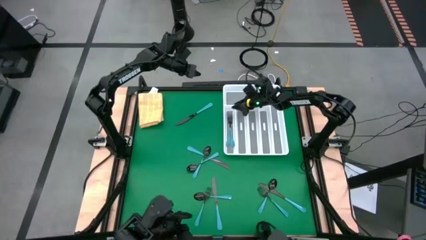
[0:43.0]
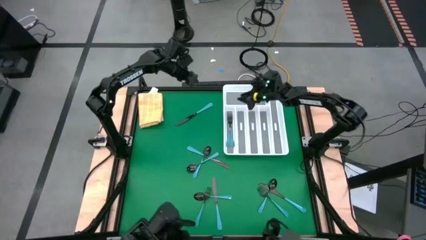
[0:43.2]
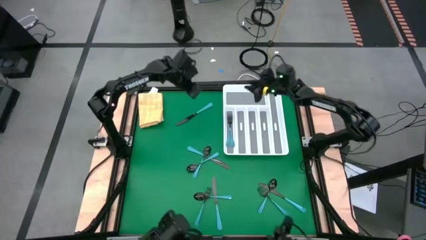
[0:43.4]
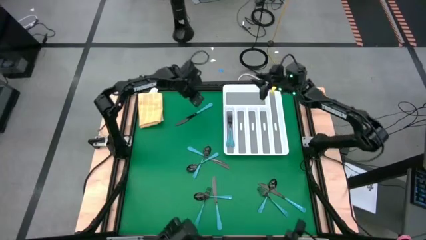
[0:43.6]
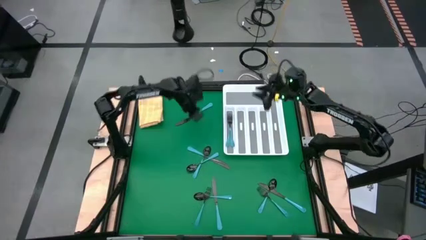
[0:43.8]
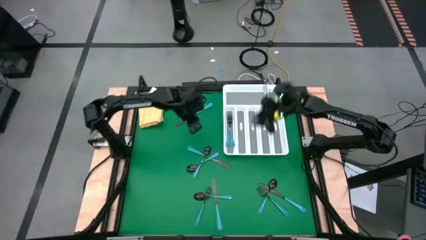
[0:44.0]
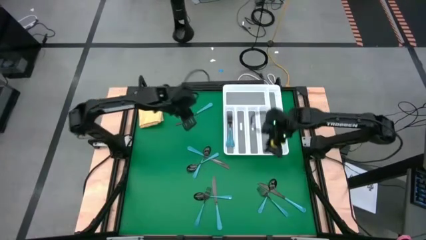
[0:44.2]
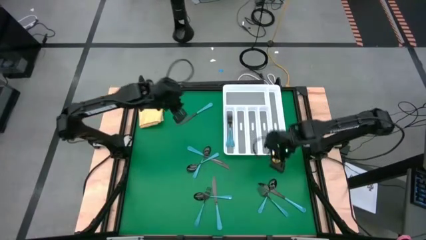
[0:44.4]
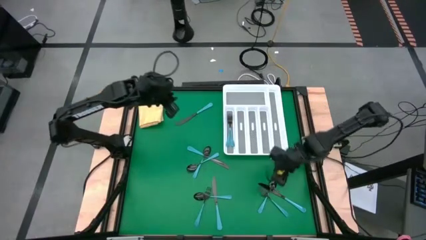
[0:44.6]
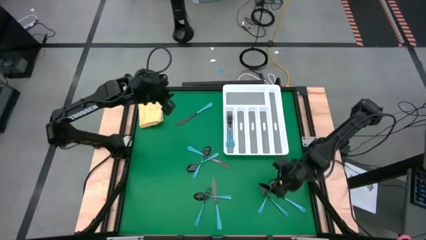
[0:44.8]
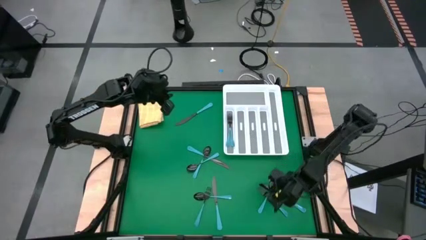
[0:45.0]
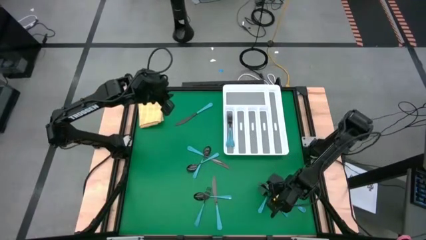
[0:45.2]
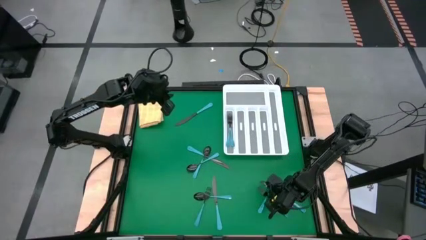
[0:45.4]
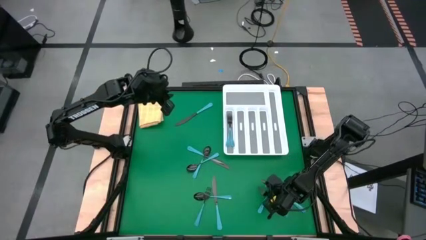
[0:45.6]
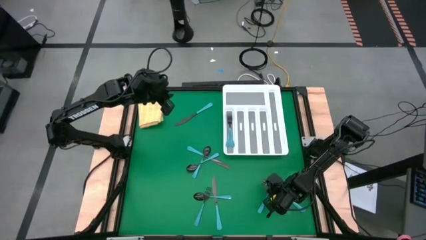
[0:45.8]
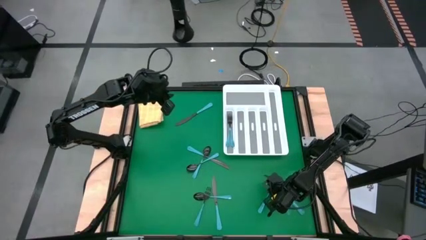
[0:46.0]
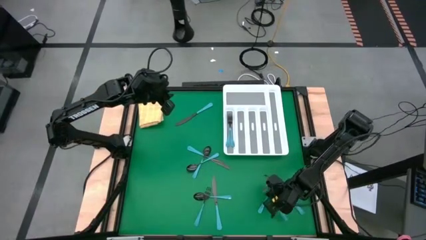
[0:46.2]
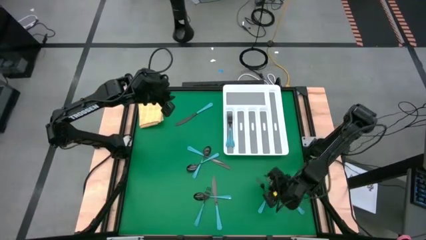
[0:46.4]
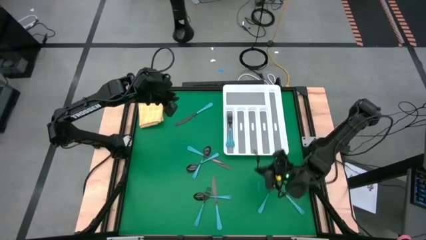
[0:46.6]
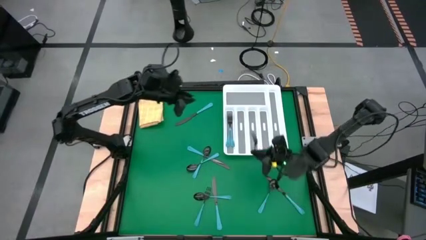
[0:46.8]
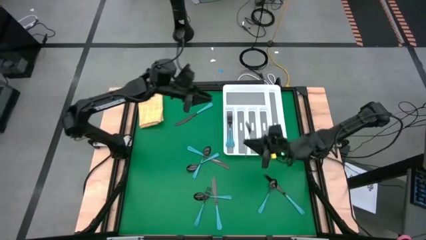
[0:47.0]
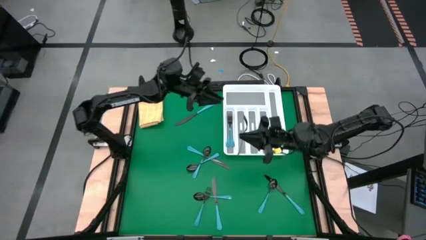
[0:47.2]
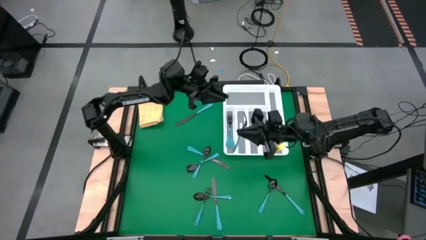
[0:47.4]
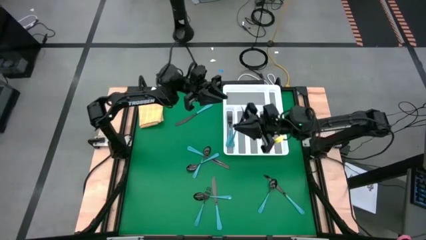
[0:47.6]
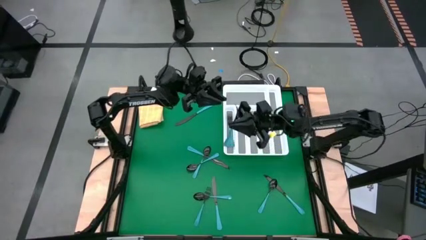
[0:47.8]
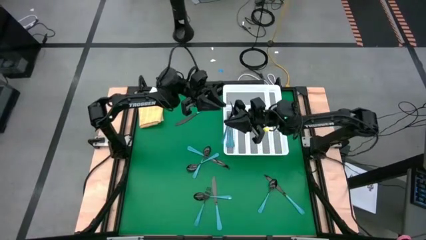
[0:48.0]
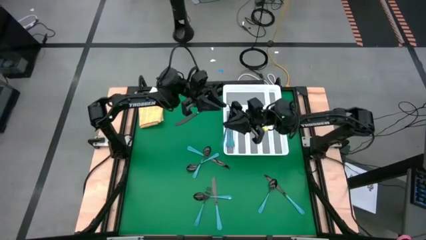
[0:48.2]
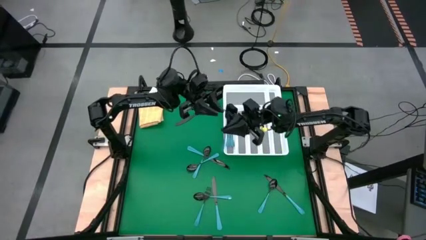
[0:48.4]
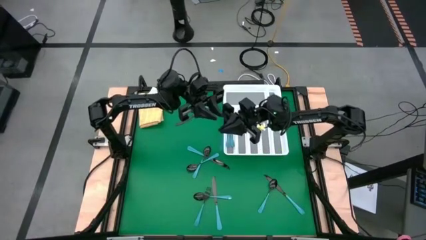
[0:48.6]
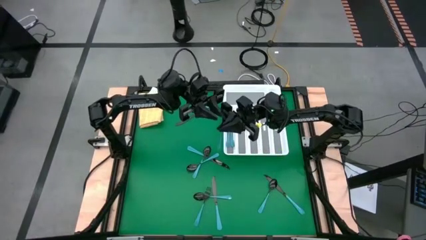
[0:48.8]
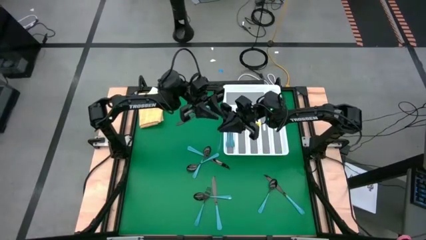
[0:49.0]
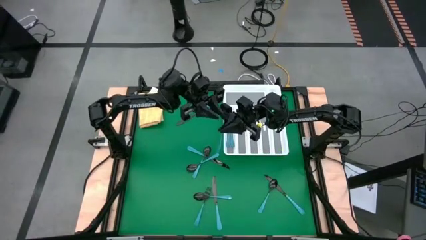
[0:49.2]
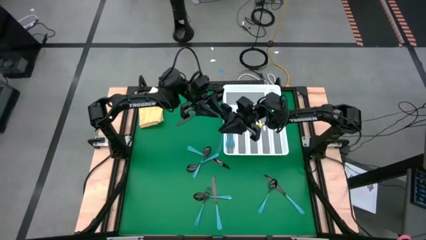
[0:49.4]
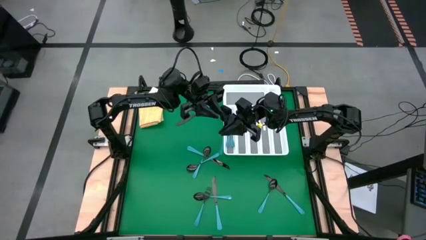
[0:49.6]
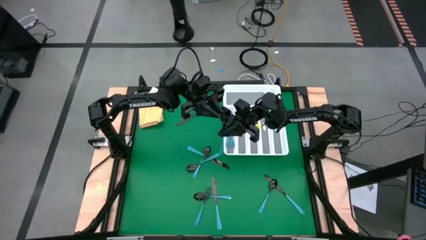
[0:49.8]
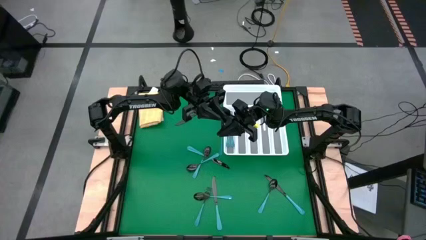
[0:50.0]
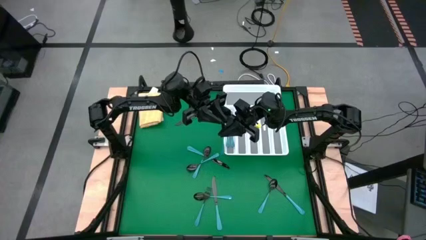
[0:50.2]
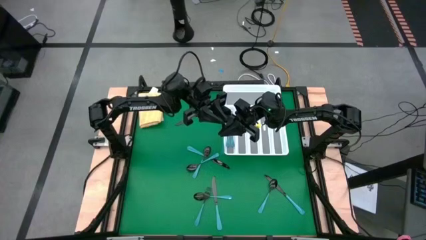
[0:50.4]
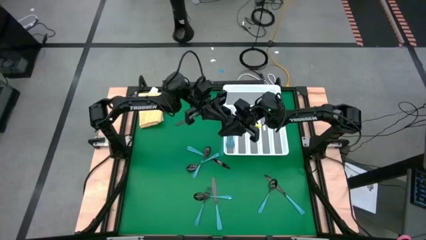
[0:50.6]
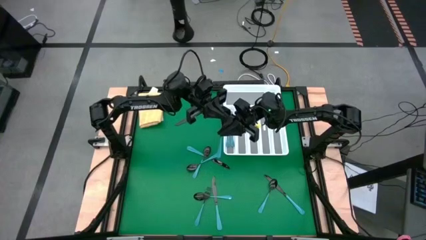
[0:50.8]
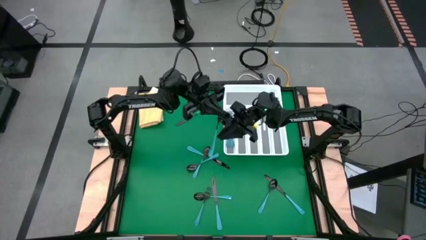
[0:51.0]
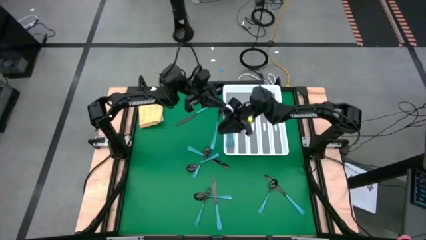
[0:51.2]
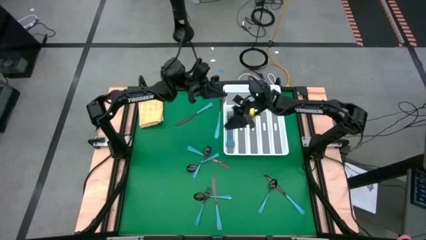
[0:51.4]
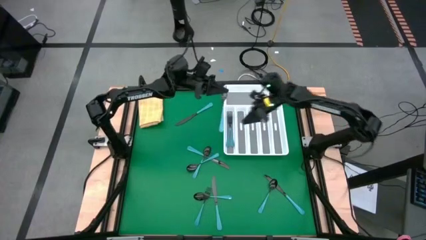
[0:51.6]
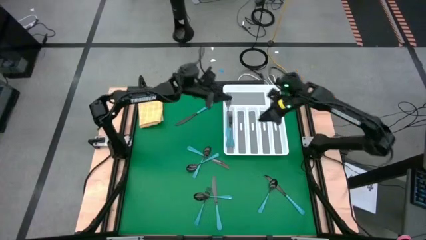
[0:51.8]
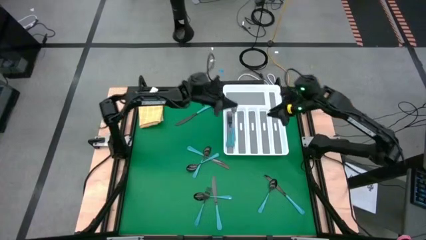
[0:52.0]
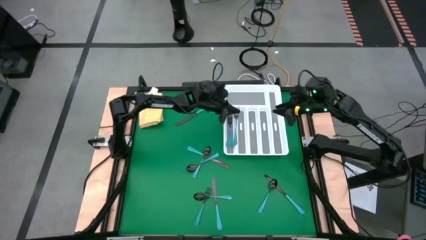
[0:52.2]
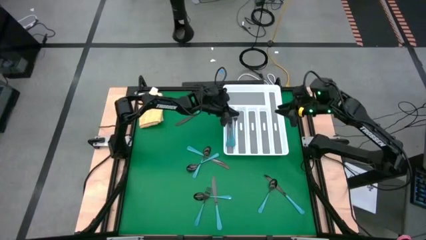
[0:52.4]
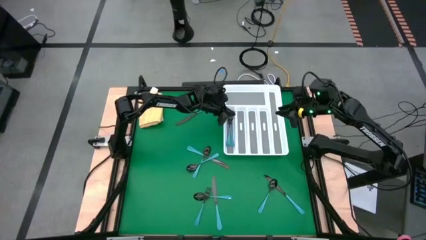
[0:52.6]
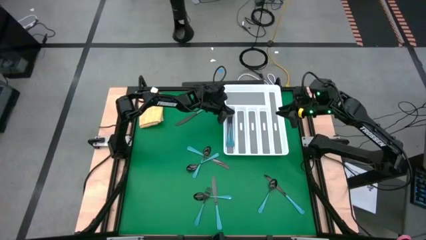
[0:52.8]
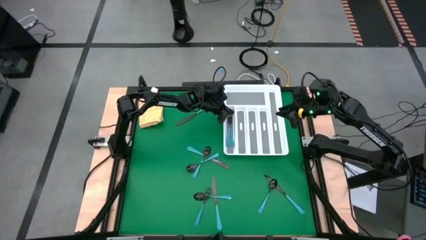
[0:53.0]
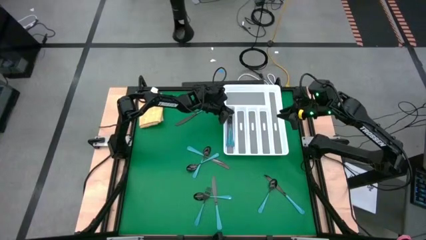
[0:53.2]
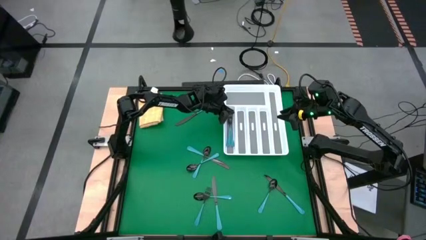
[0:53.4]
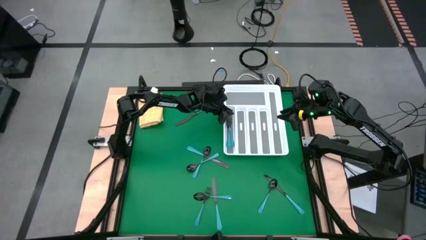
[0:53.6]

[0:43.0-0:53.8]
Task: Sort silverware
Put the blue fork into the silverware organizer

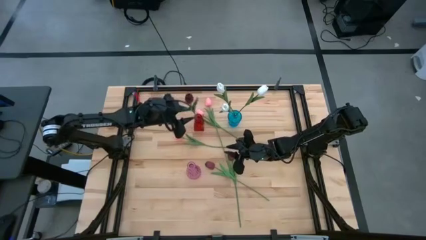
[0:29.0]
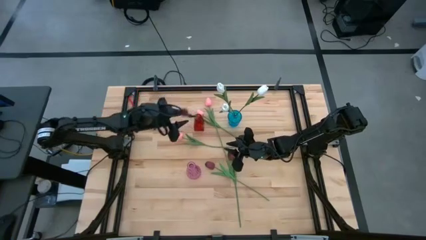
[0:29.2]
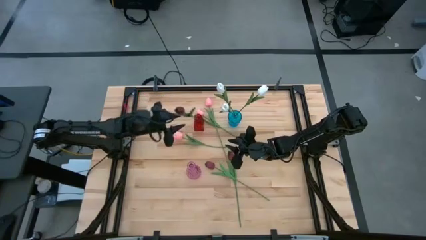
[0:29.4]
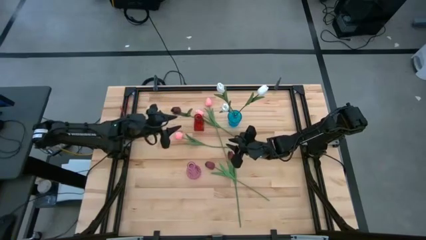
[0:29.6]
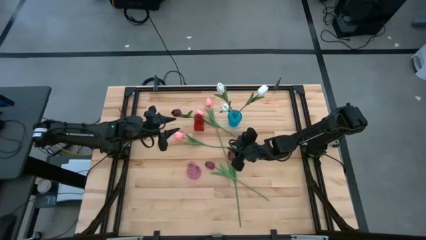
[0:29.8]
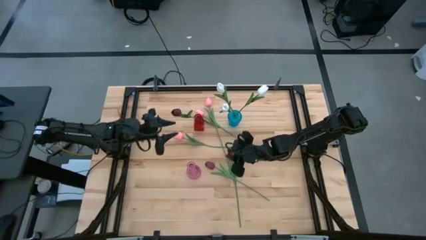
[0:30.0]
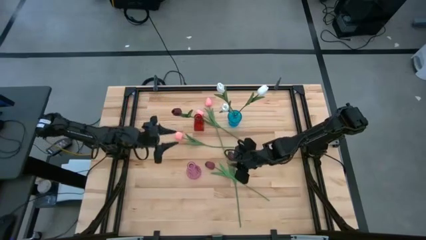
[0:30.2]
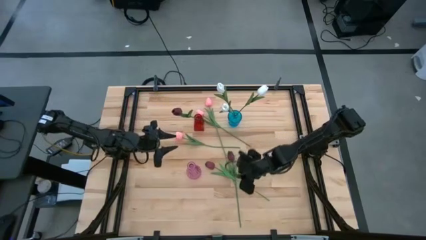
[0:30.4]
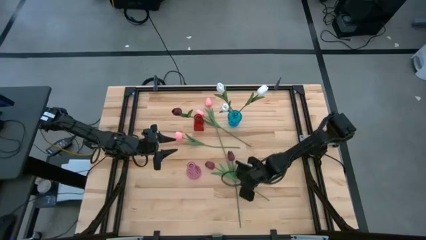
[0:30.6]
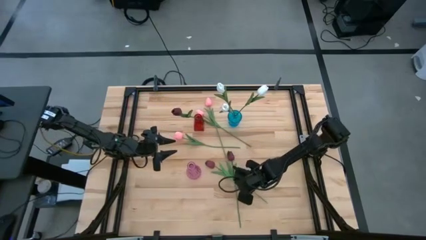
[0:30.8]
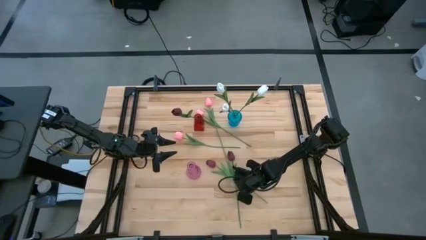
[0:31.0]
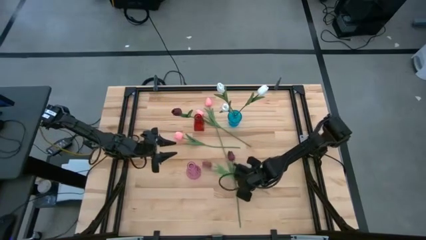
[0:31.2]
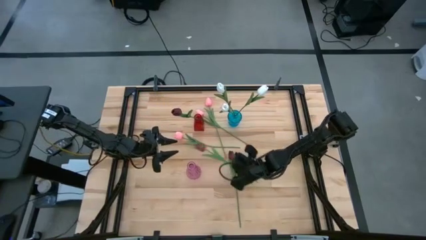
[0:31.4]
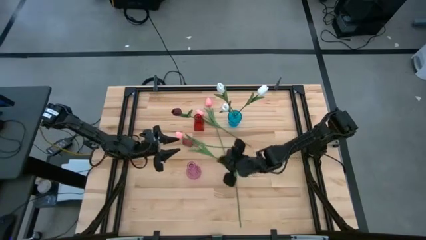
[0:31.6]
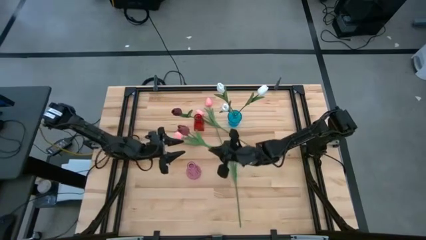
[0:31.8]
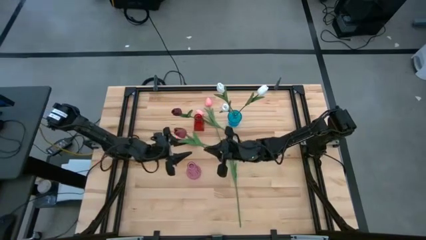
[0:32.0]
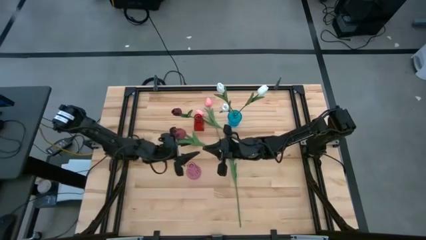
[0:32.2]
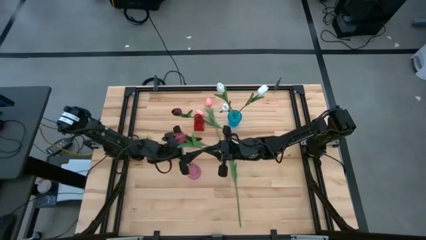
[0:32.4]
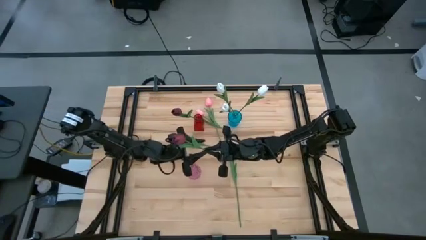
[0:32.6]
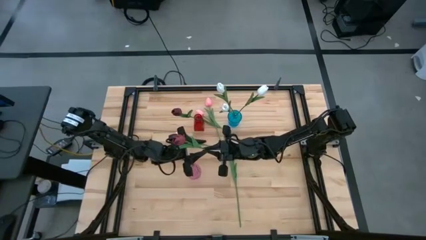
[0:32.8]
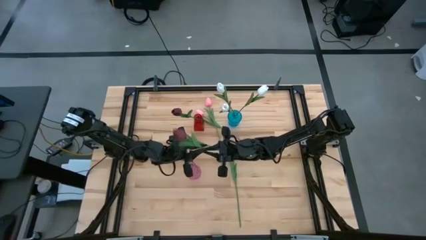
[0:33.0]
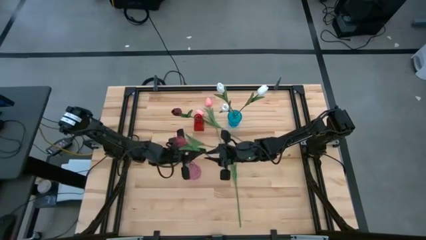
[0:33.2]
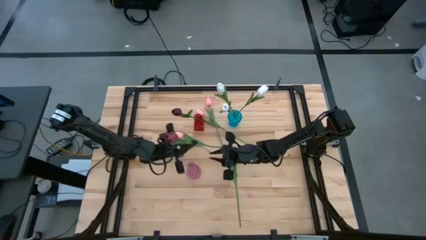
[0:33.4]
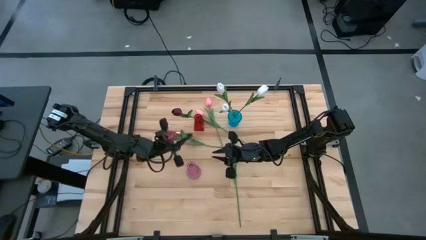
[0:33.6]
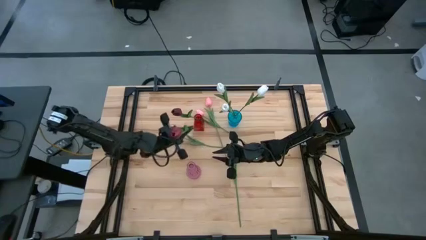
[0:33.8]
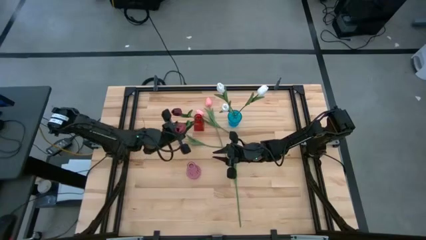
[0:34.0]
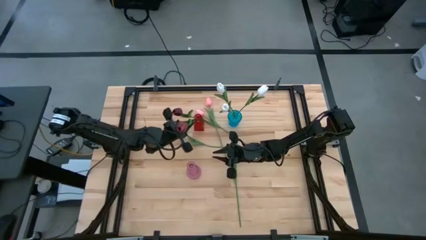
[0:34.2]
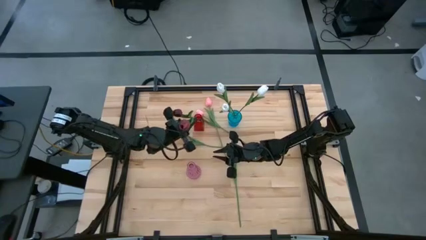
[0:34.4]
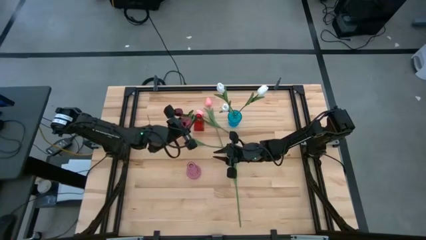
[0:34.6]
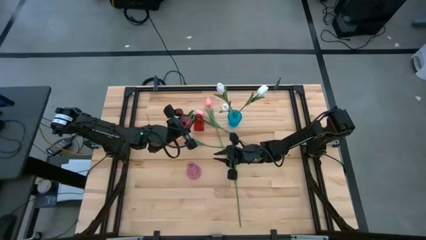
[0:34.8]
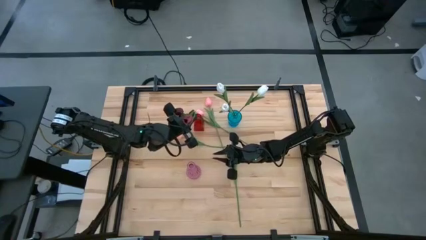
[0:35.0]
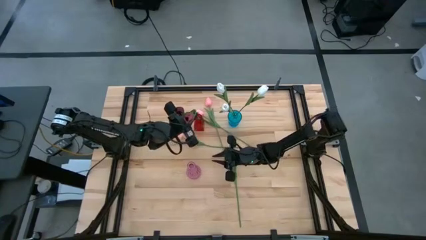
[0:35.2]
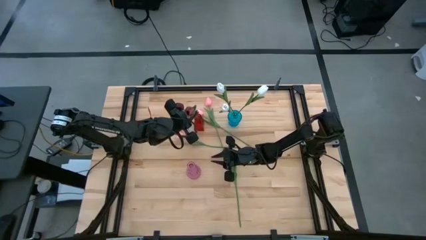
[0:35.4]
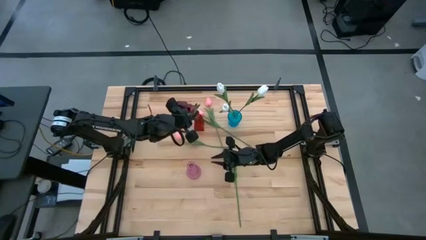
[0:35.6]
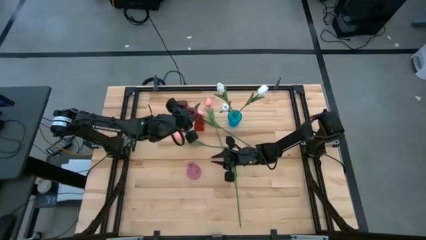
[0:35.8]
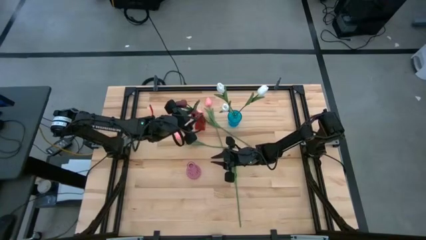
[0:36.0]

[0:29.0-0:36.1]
Task: Sort flowers into vase by color
Put the left red flower into the red vase
